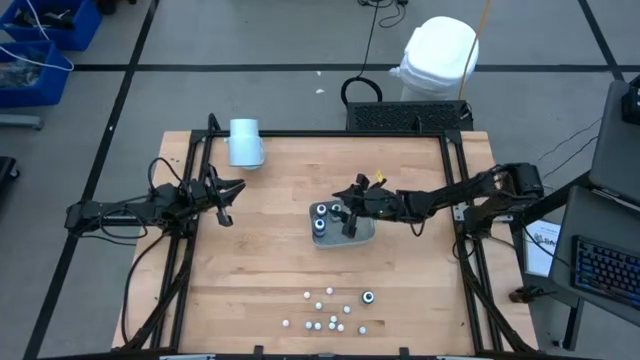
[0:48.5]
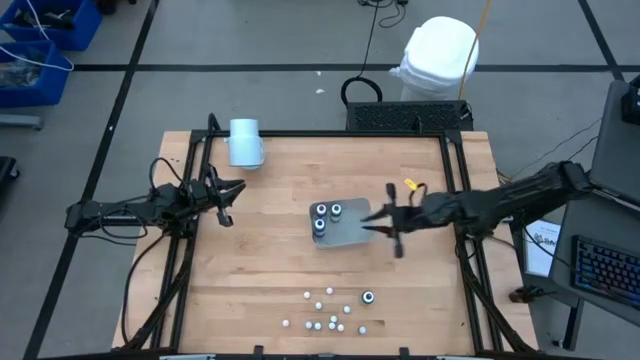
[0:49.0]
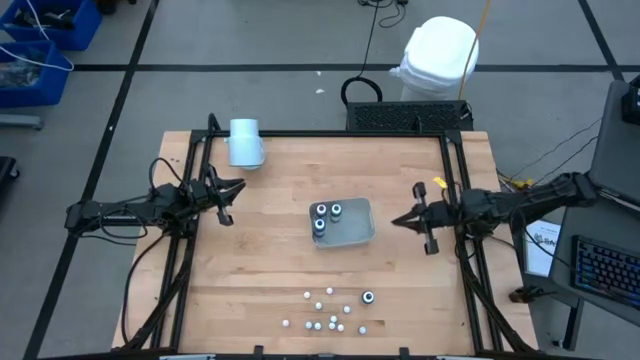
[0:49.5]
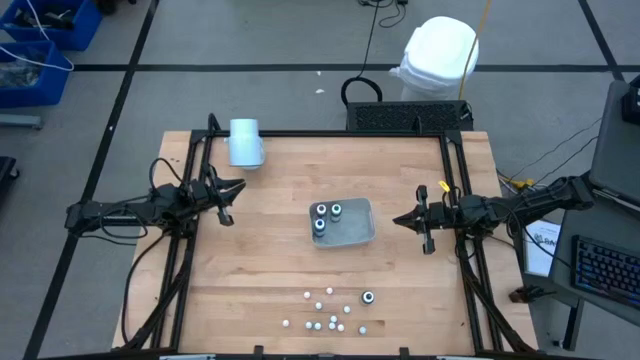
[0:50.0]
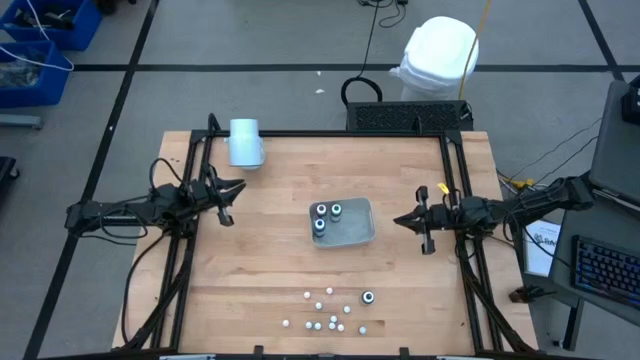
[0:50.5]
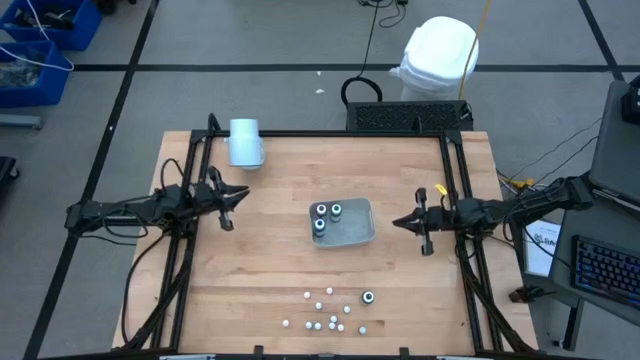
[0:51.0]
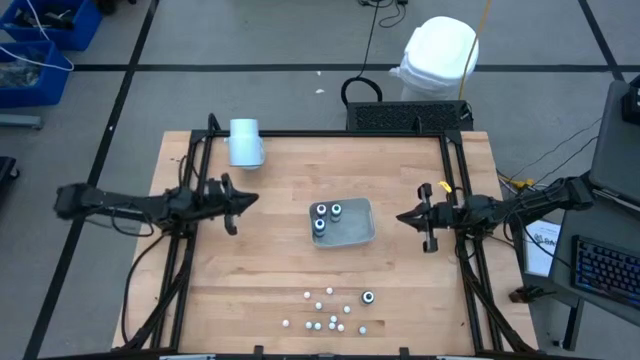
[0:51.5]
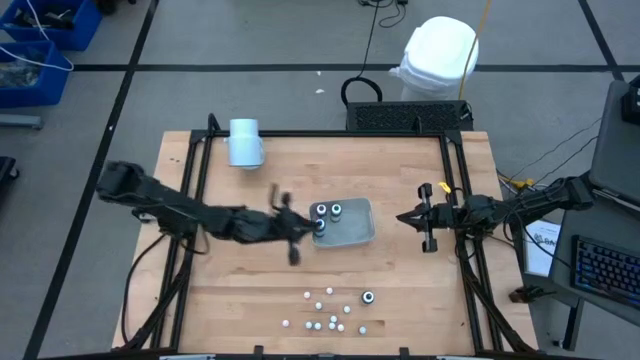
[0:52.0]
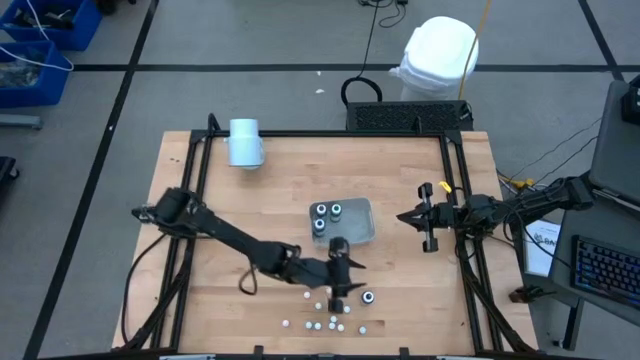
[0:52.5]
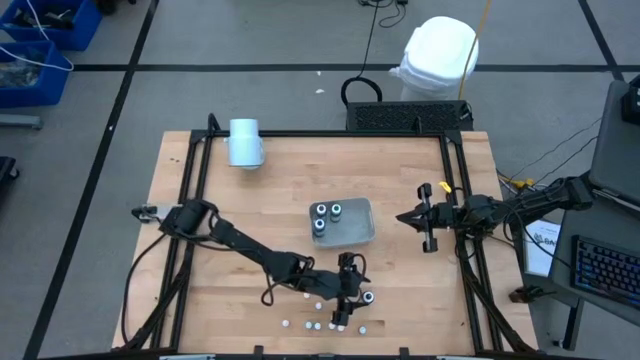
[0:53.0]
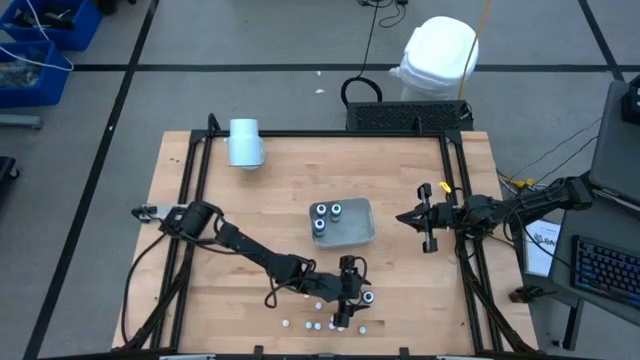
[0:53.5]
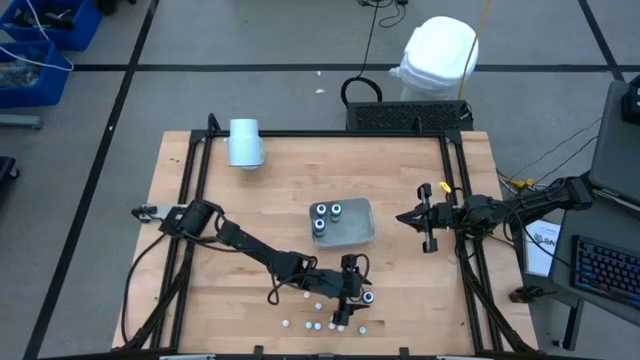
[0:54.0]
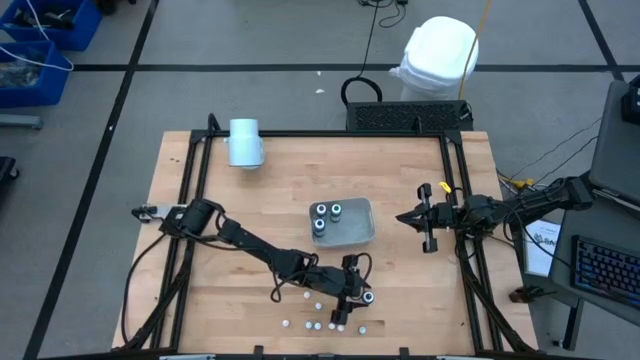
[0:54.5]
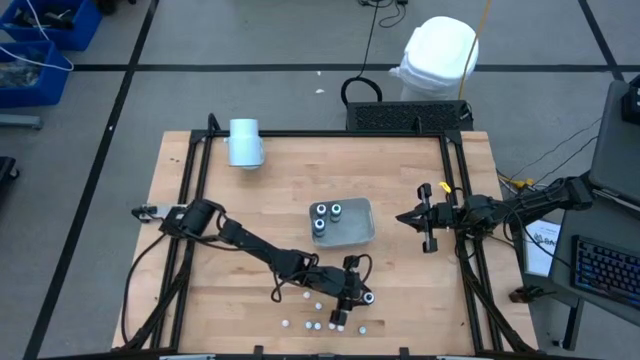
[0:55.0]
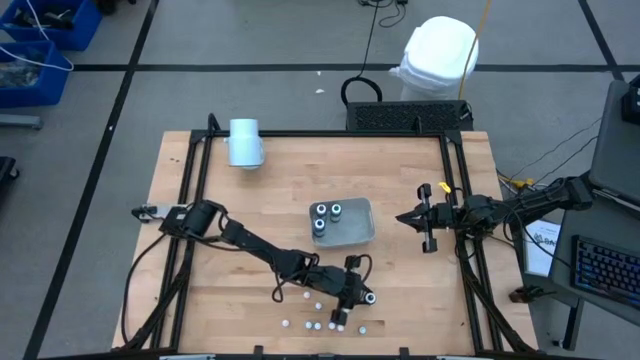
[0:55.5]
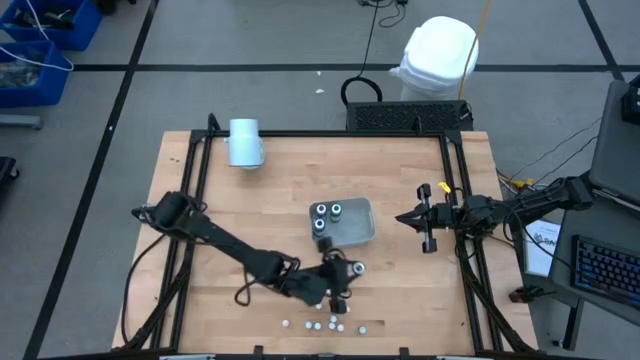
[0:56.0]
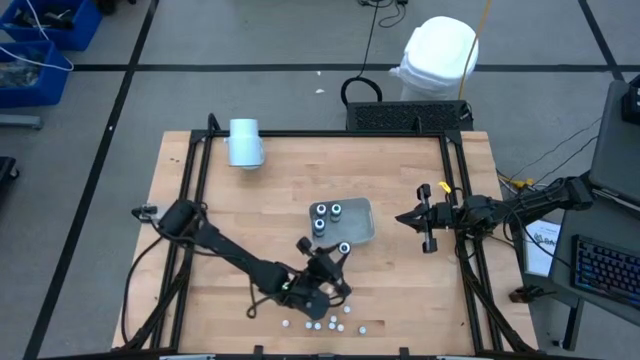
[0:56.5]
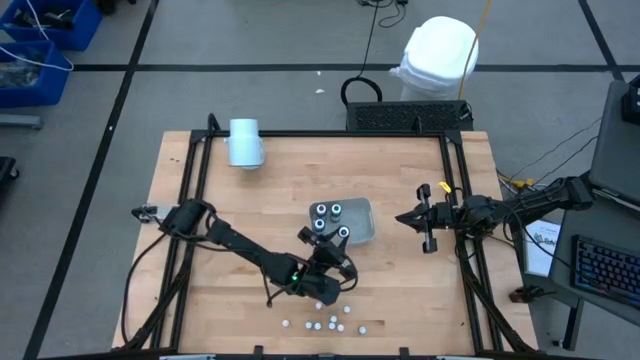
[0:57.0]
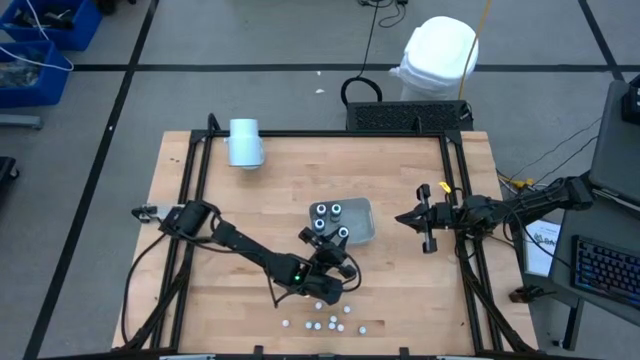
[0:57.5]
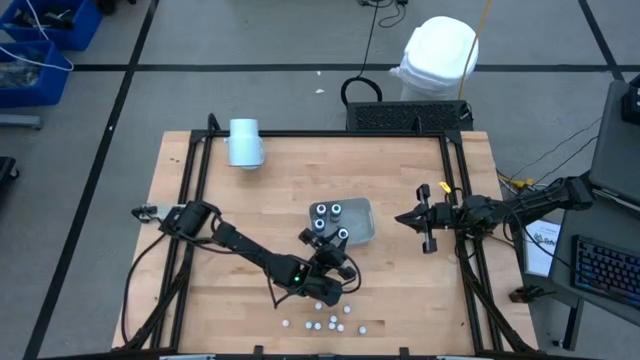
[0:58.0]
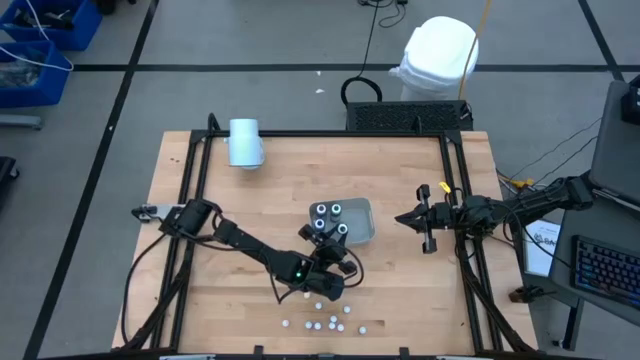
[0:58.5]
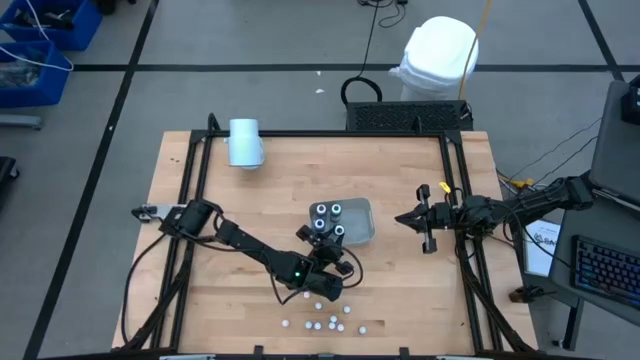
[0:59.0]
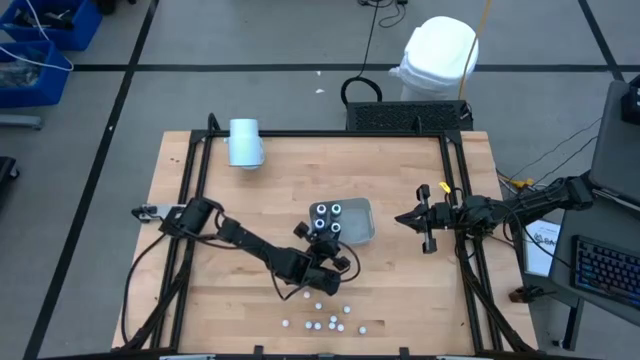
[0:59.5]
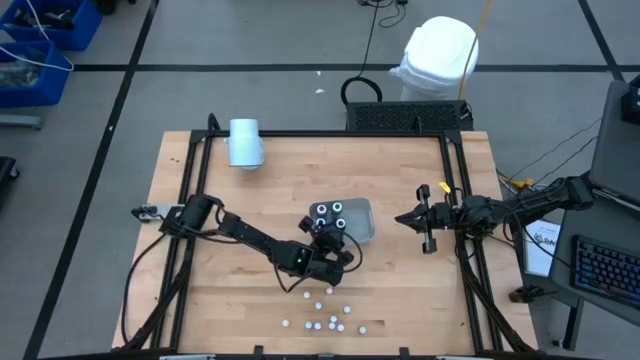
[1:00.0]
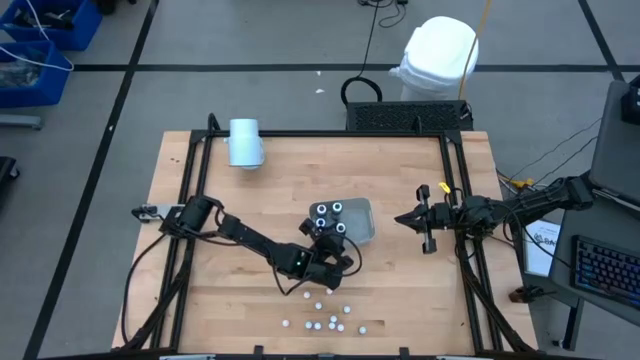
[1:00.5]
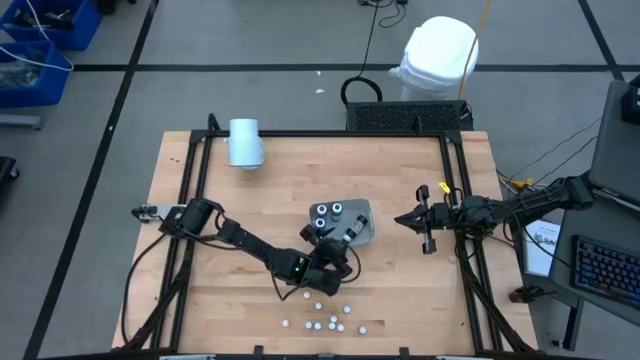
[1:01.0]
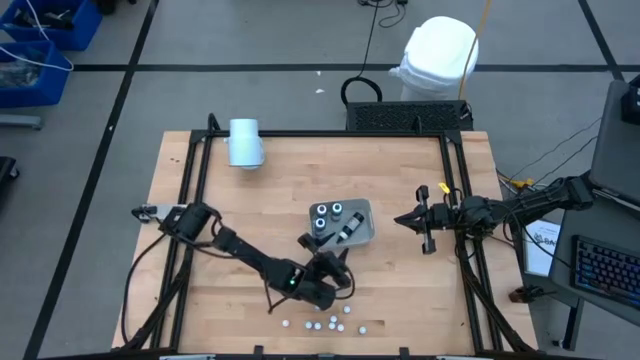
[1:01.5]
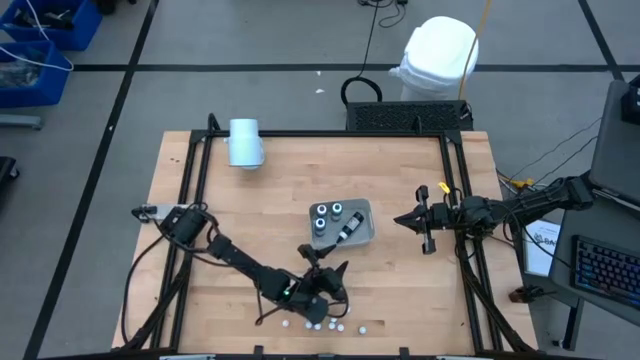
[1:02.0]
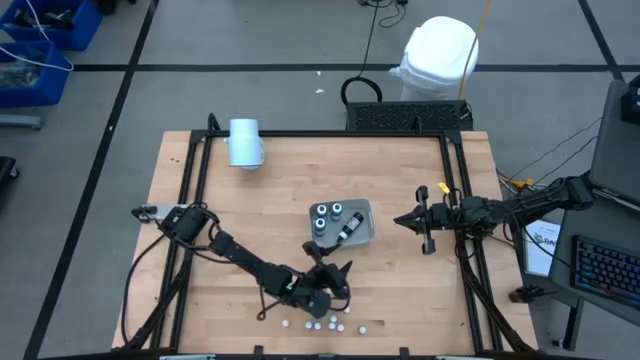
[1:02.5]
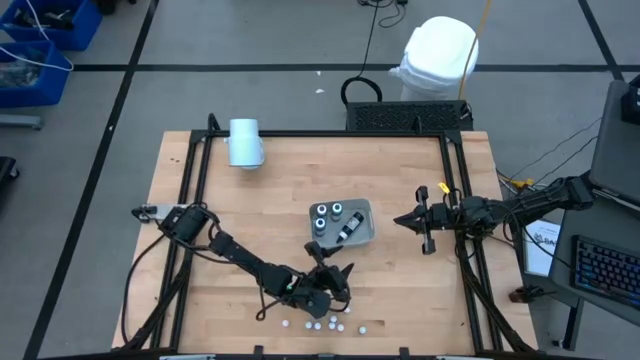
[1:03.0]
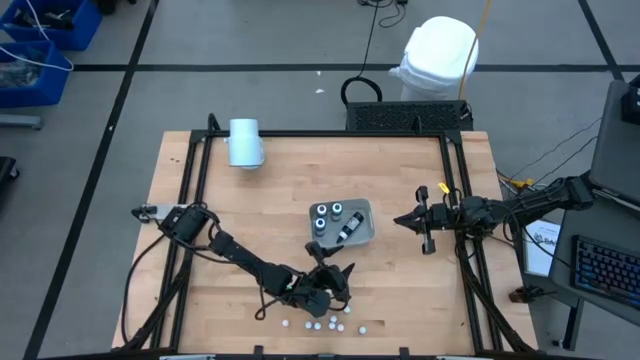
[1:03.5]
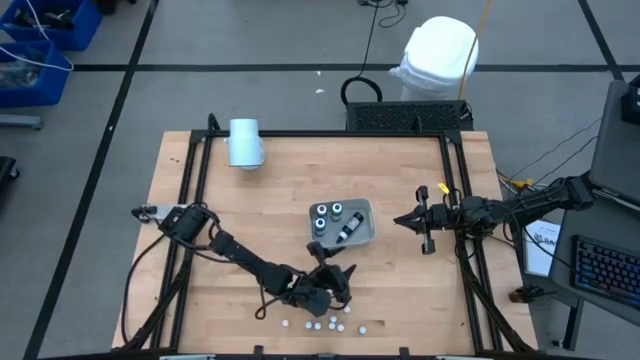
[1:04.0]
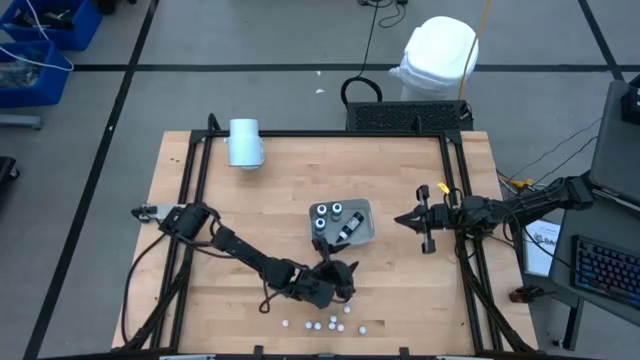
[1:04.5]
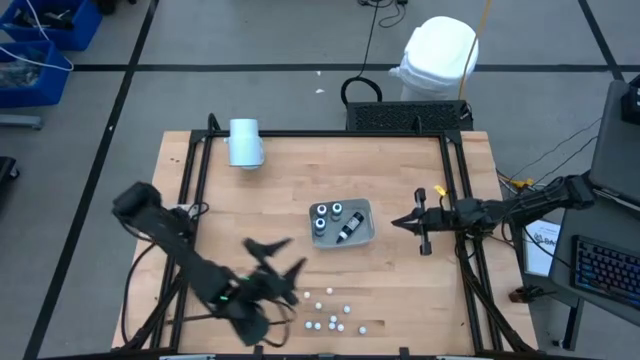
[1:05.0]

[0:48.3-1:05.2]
Task: Pick & Place food coloring
Put the large black food coloring bottle into the gray bin

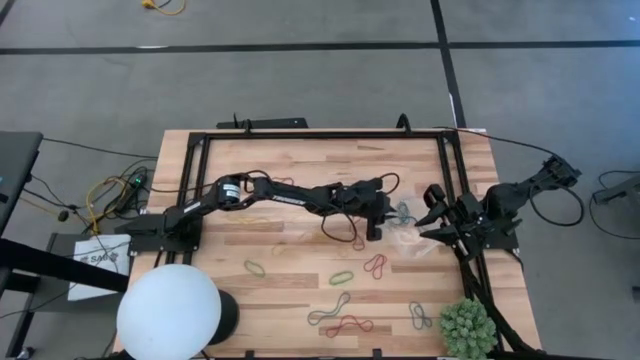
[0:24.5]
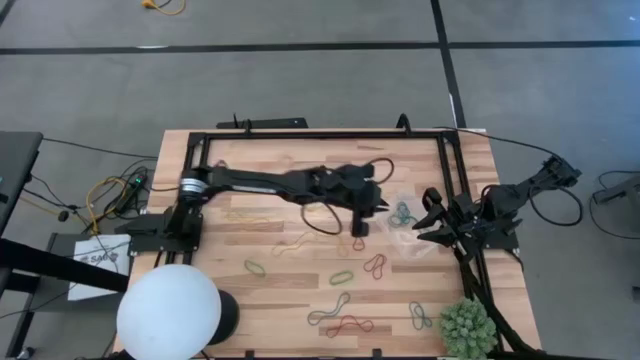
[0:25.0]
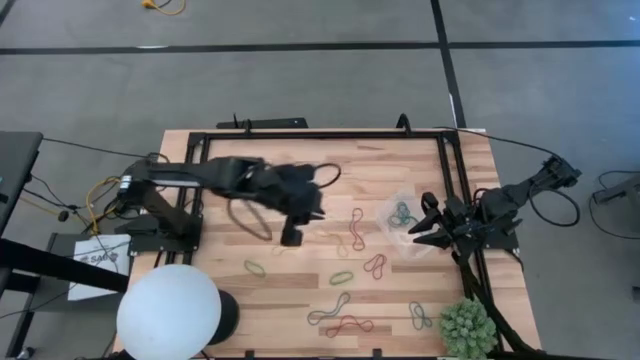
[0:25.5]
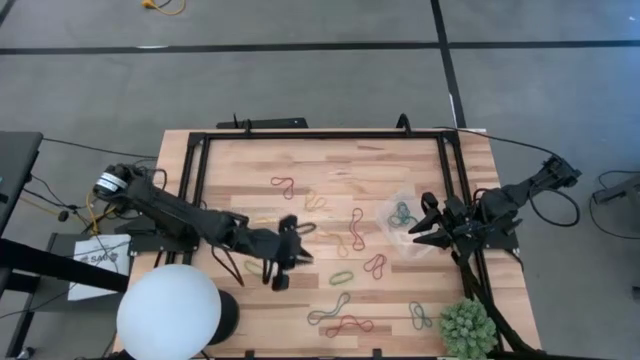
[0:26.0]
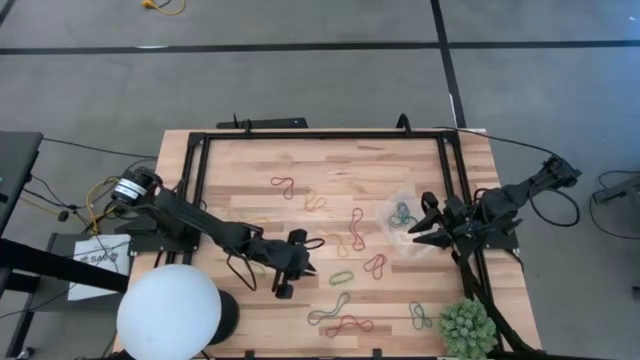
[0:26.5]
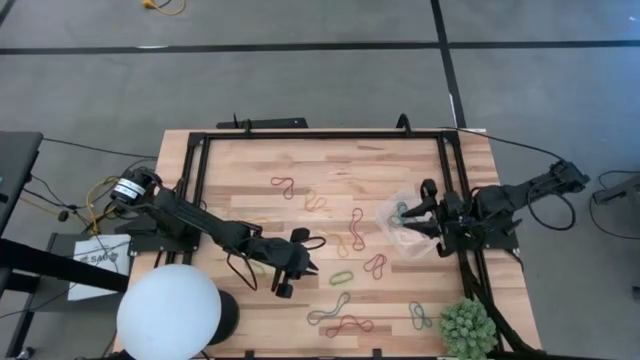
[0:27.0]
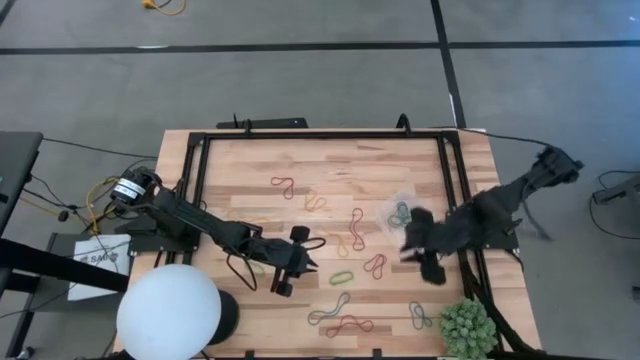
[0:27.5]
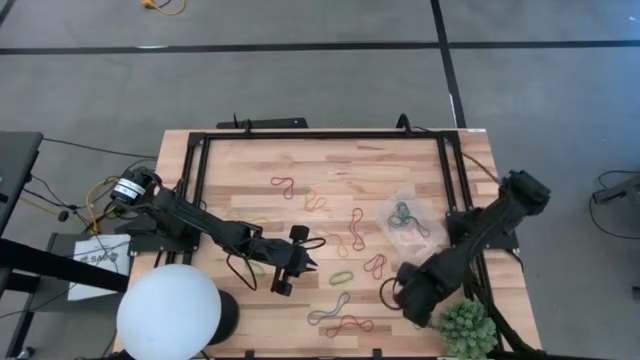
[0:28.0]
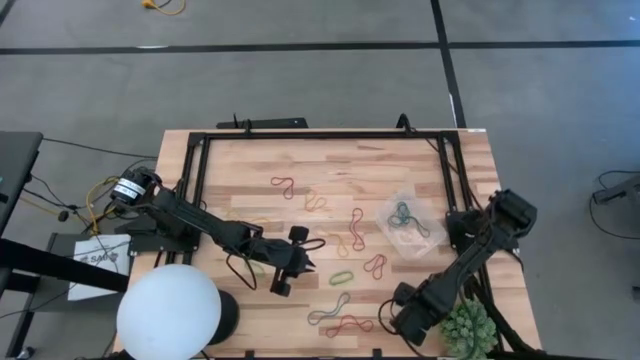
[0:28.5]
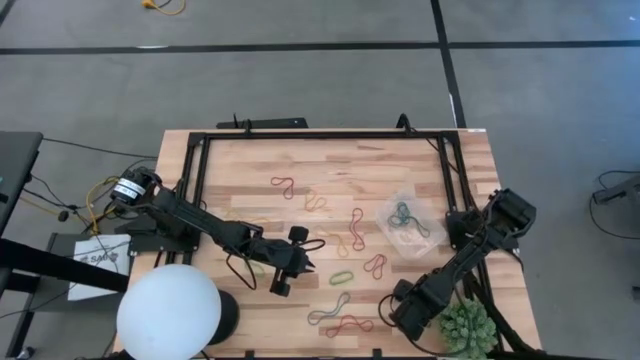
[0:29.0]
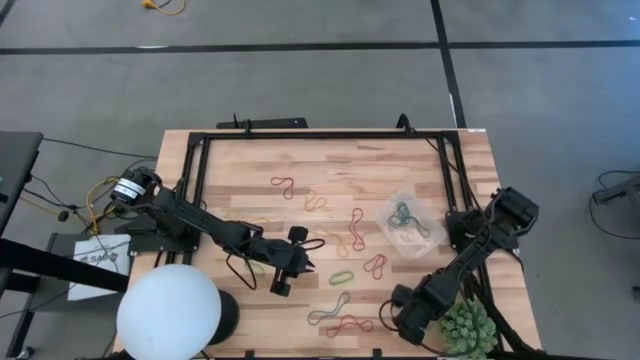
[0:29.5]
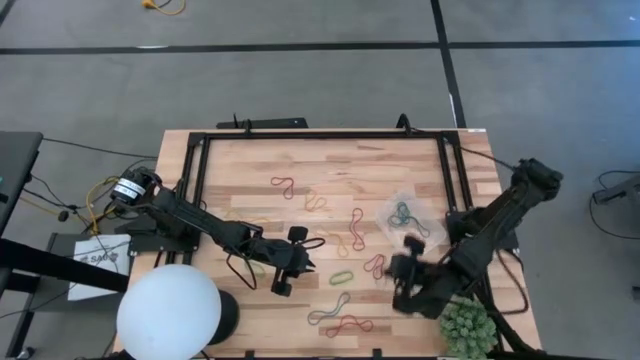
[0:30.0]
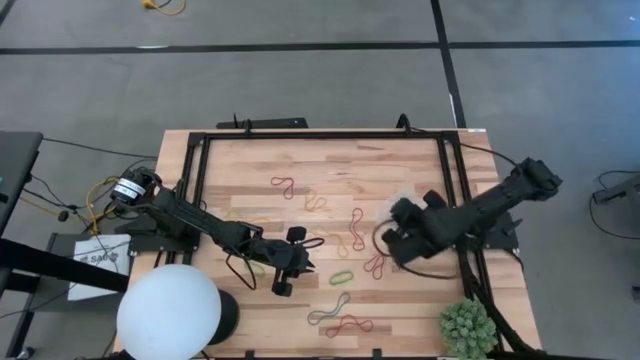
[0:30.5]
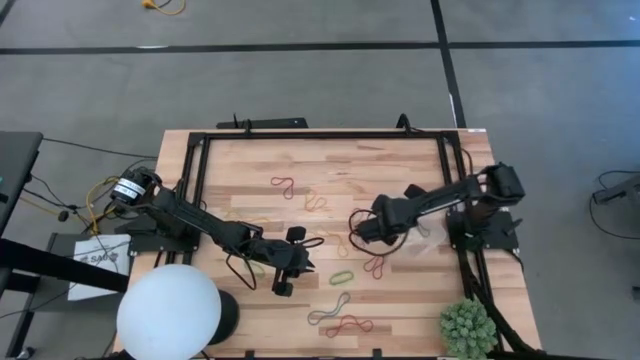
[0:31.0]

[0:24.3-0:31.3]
Task: Pick and place items into bin
Put the blue rubber band into the transparent bin
